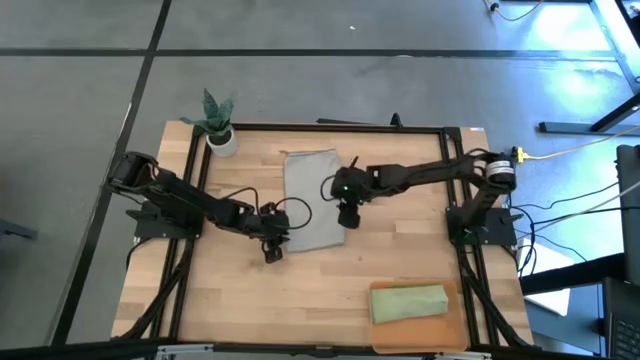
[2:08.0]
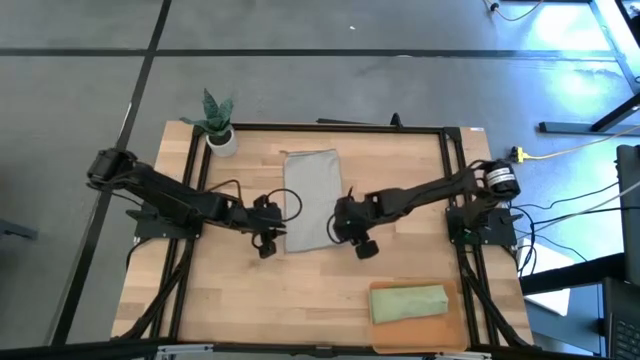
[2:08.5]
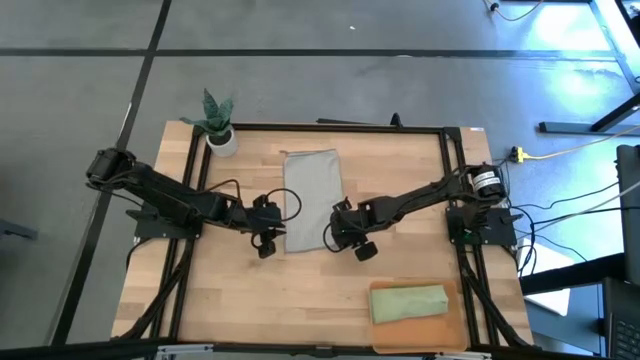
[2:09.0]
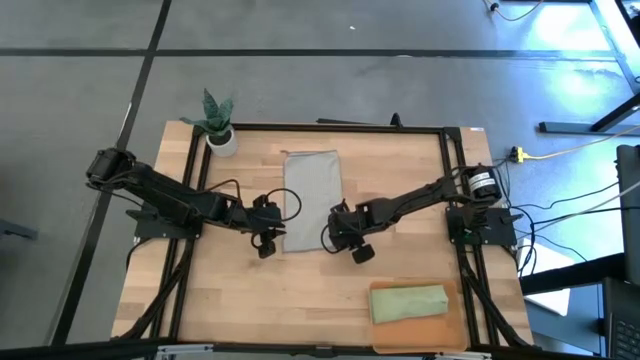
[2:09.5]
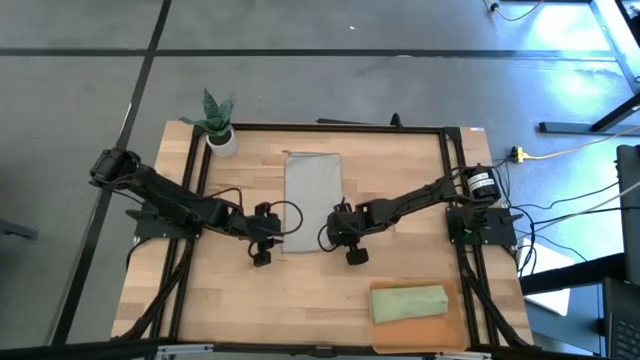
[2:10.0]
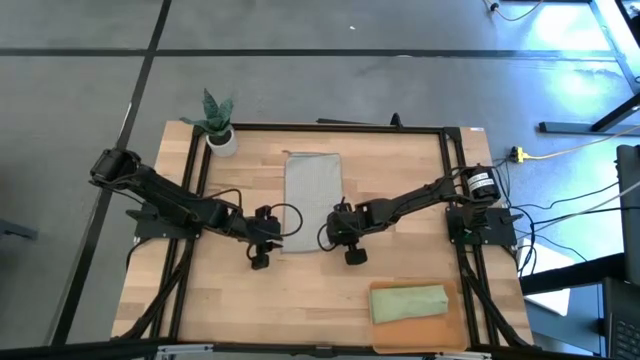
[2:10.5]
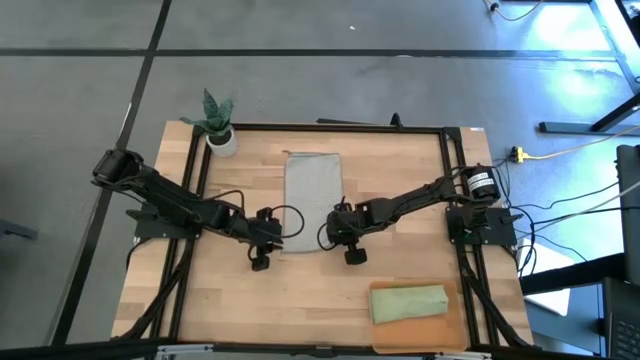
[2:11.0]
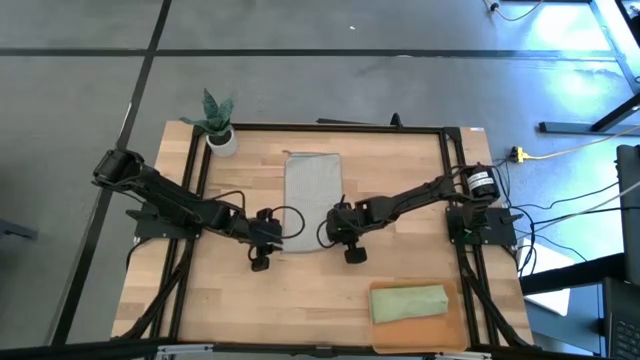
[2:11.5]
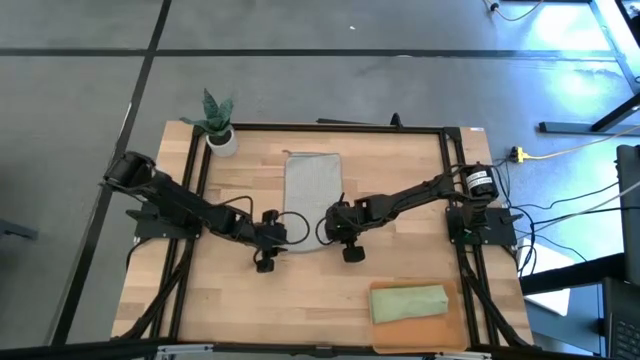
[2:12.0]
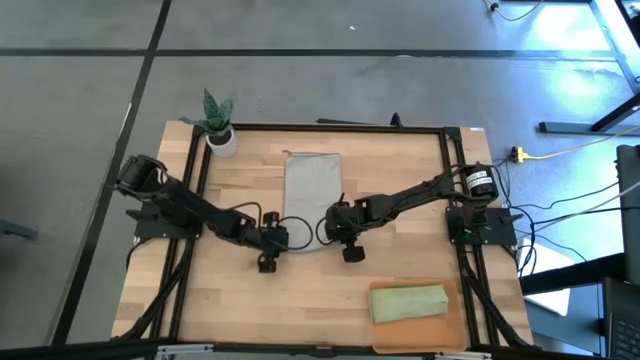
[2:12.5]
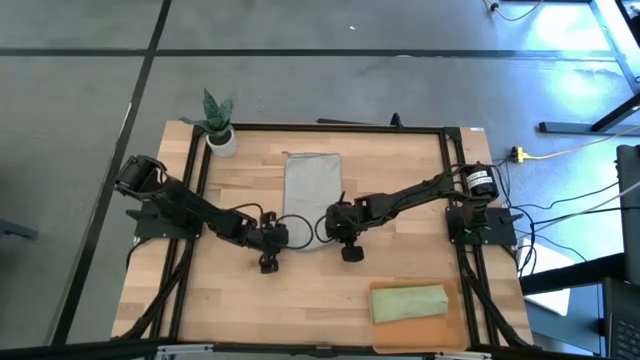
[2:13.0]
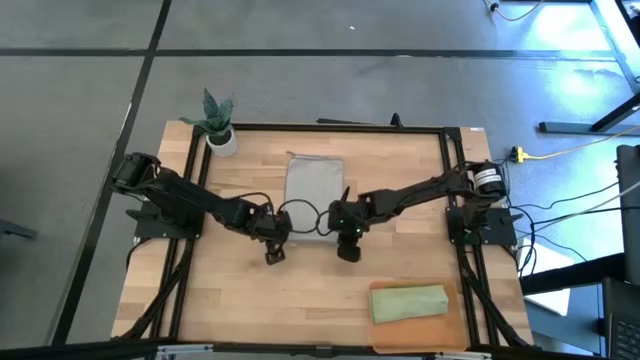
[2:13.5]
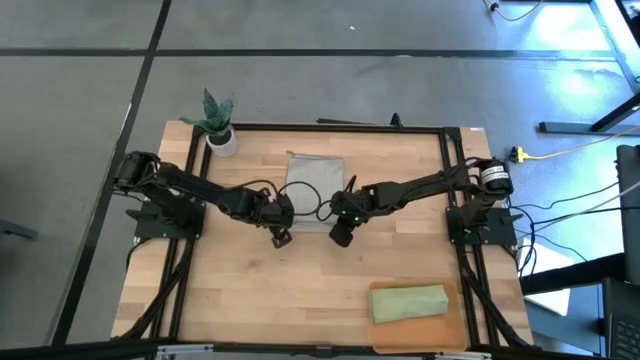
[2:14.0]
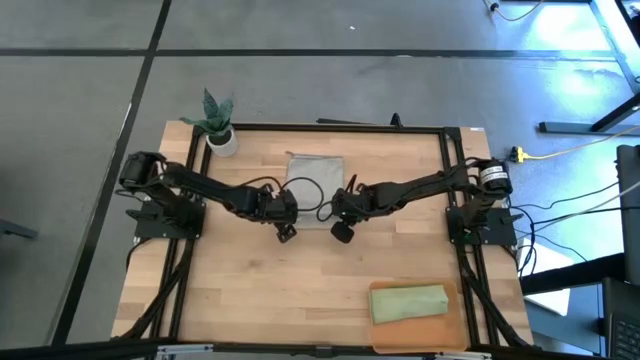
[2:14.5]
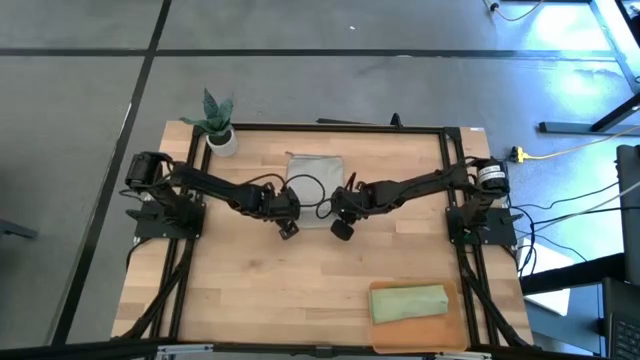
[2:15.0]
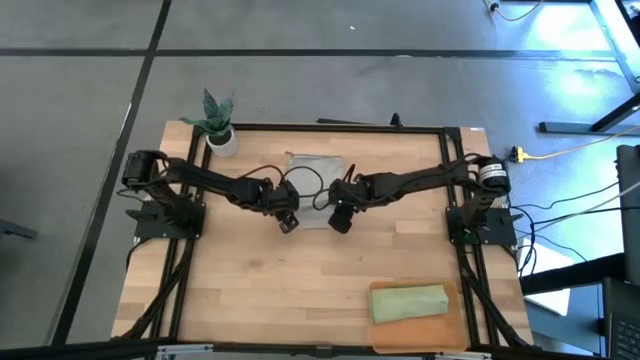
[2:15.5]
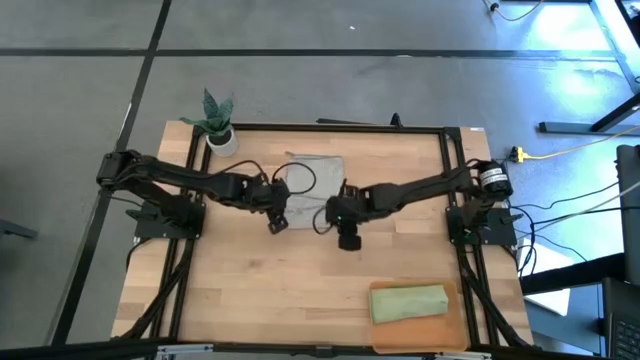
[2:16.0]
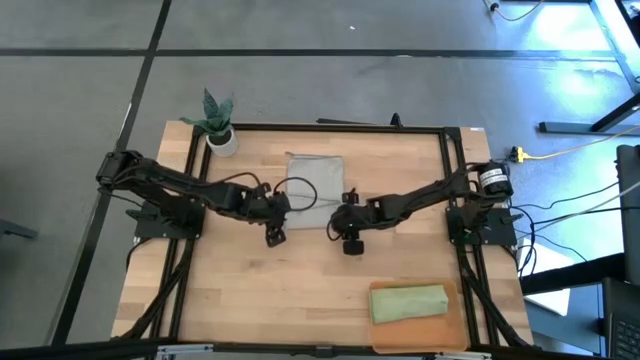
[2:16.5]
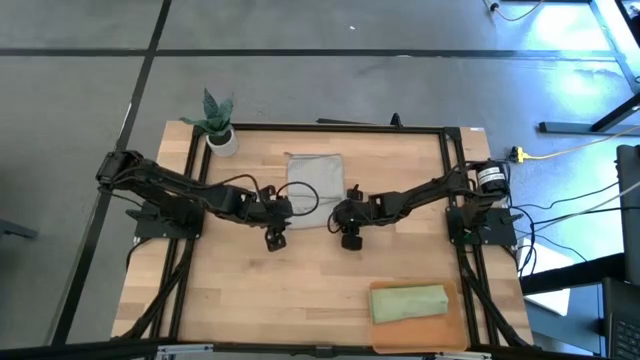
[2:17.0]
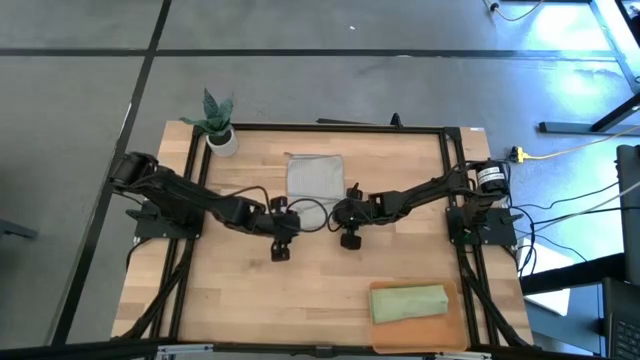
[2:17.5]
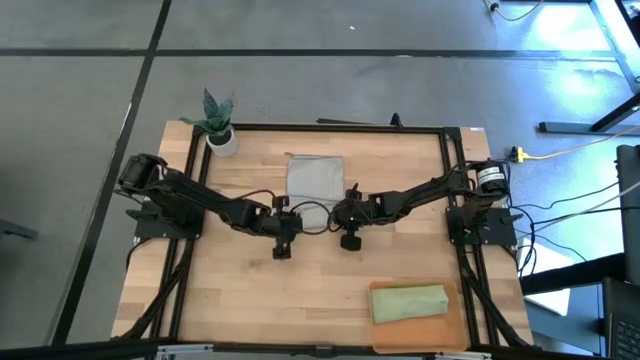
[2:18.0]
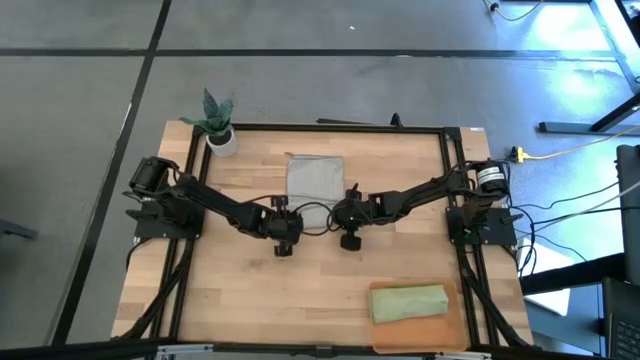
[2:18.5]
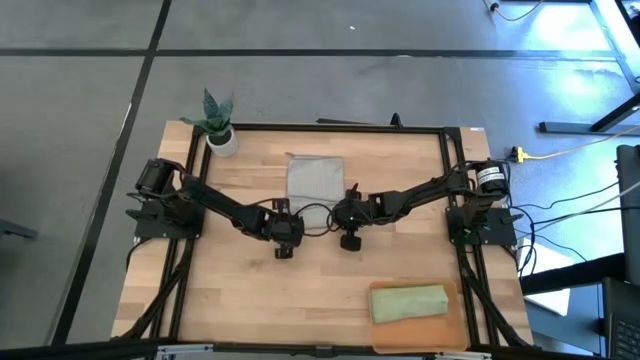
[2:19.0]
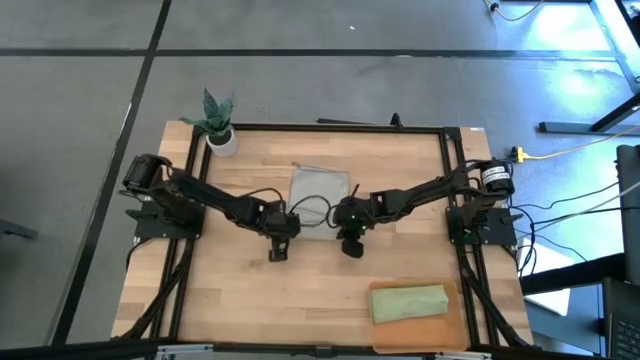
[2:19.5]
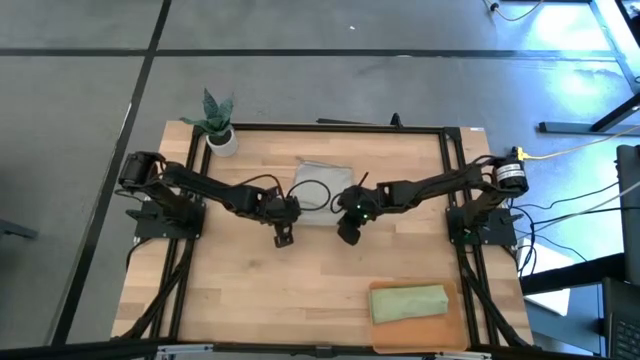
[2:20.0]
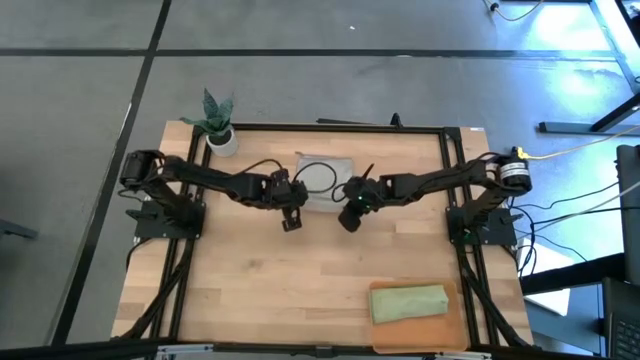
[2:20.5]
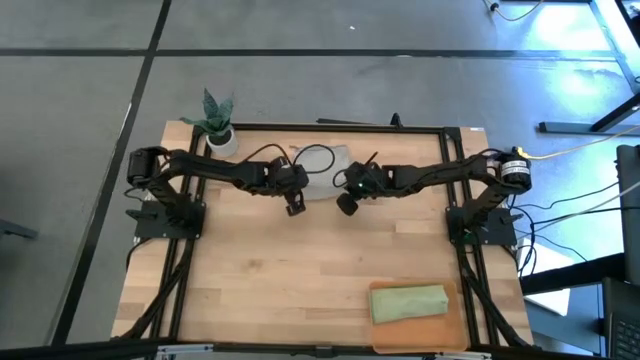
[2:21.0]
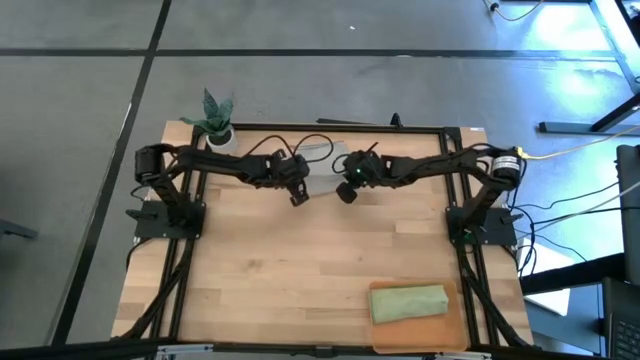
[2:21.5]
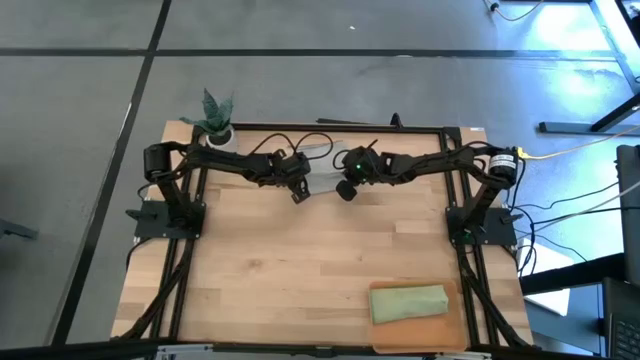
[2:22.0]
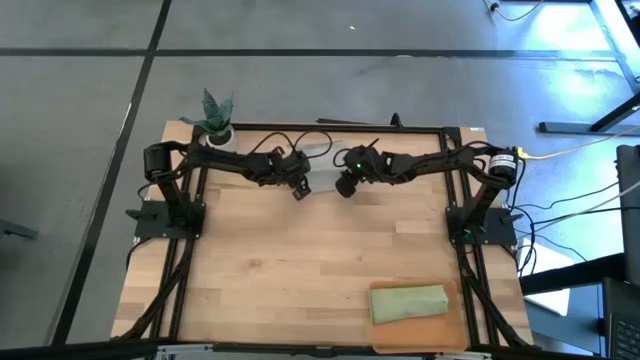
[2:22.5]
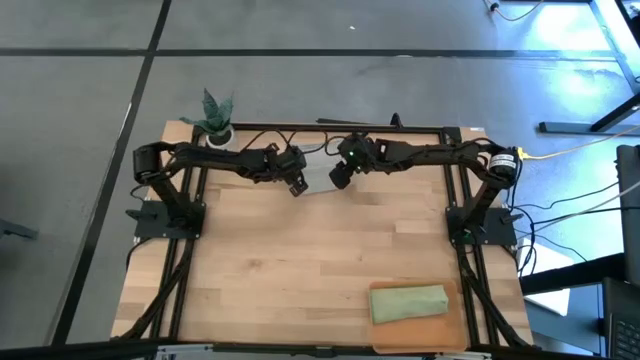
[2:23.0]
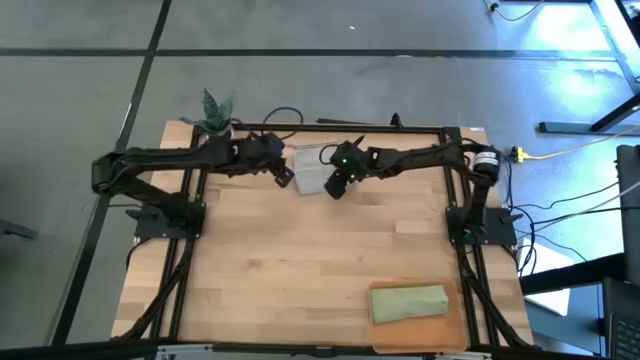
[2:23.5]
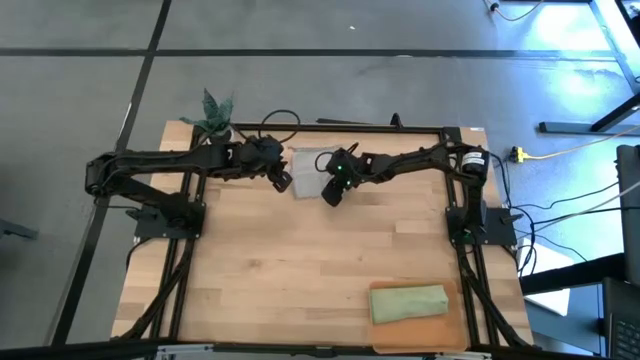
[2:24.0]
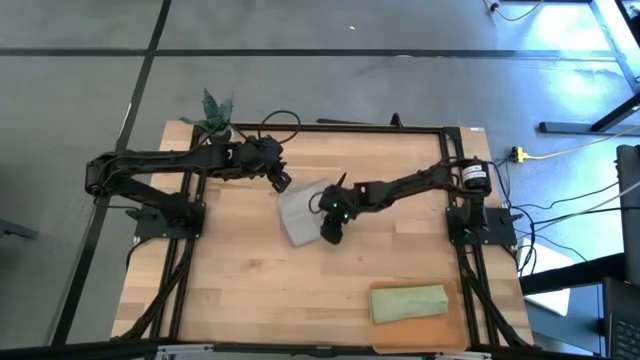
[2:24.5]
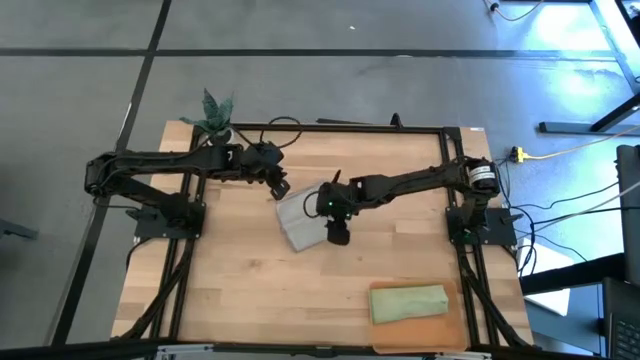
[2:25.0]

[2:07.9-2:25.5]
Task: Roll microfiber towels into tight, uniform cylinder then place into a basket
Roll the gray microfiber cloth

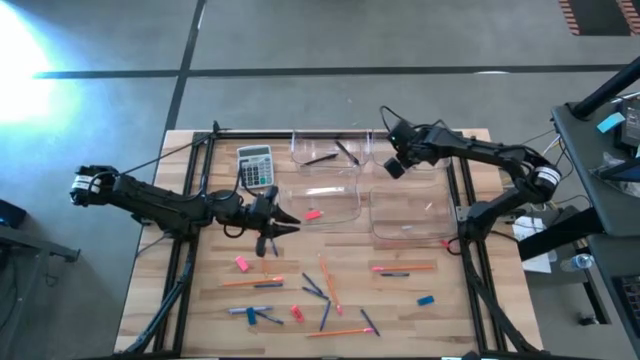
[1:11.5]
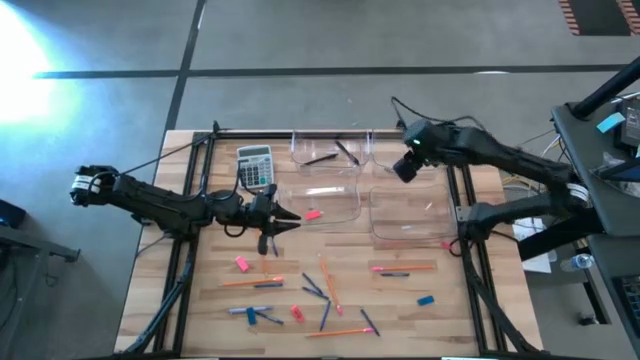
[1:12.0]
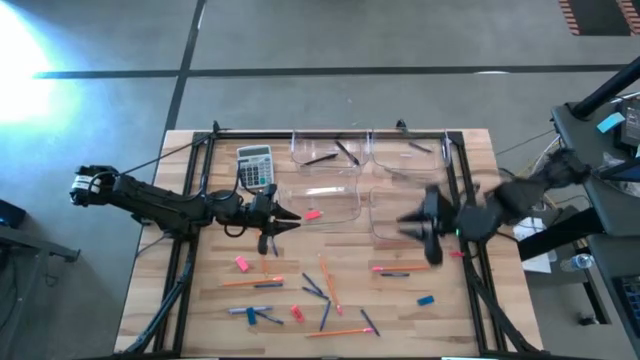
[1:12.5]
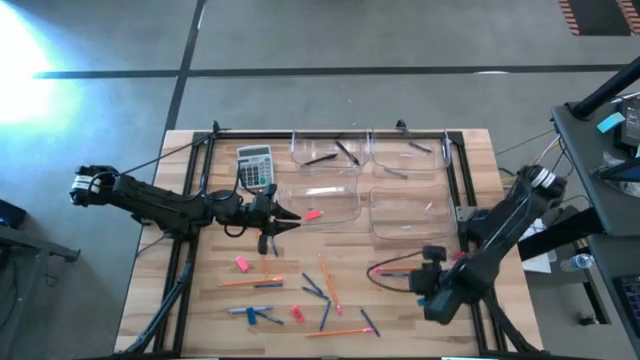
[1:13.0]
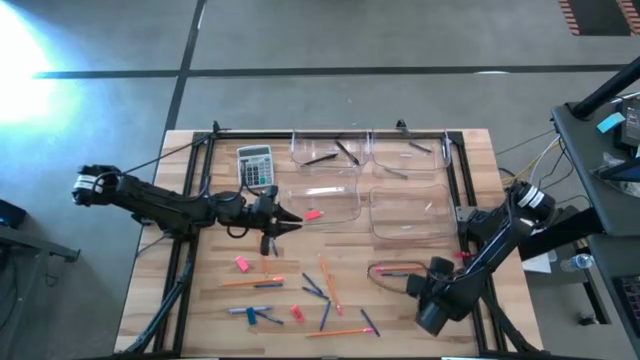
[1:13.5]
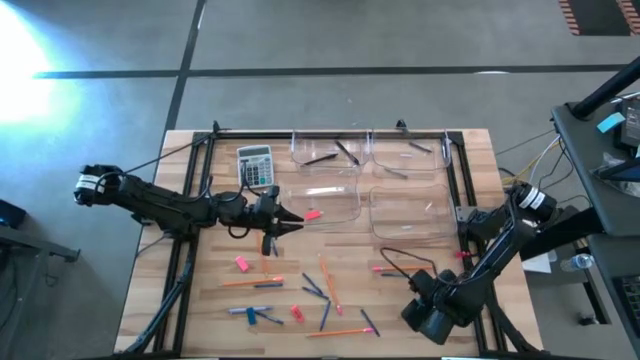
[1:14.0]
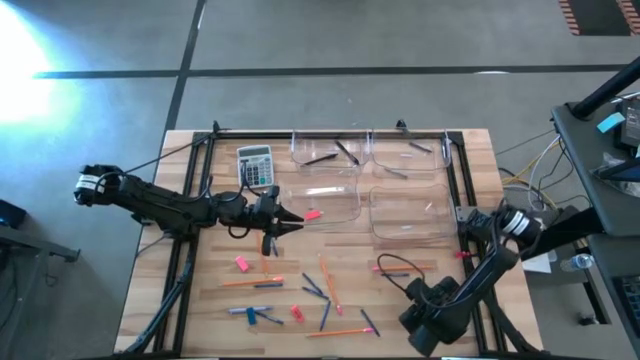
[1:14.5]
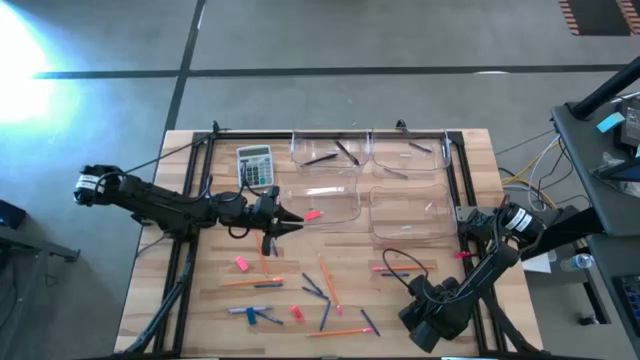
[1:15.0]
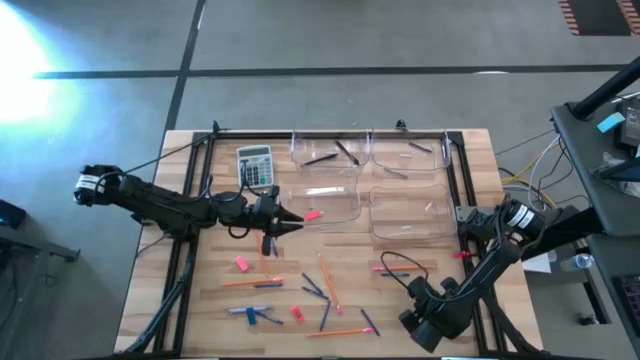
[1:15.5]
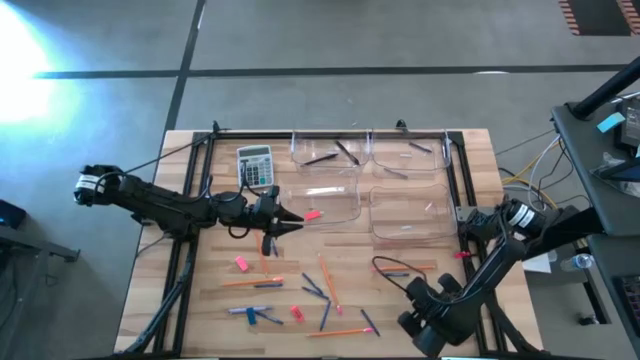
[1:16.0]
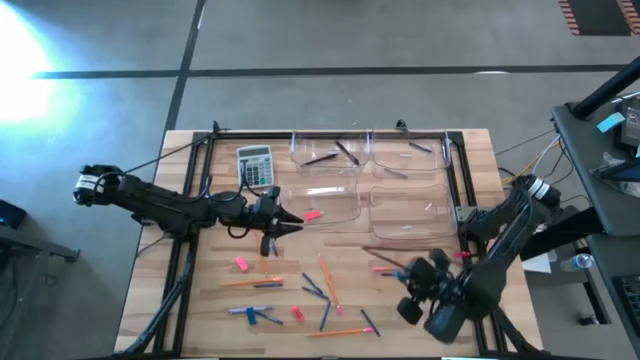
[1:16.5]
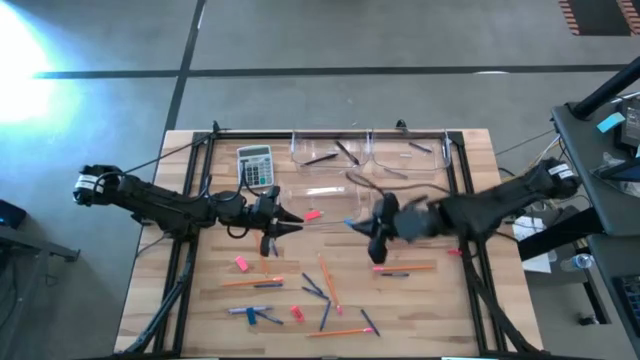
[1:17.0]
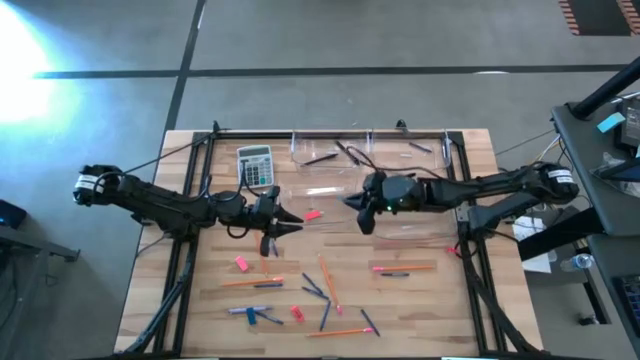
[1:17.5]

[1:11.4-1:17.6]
Task: Sort crayons/erasers/pens/pencils in bins
Put the blue eraser into the bottom left transparent bin
